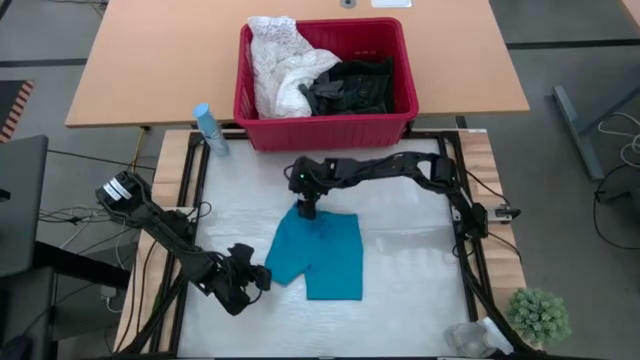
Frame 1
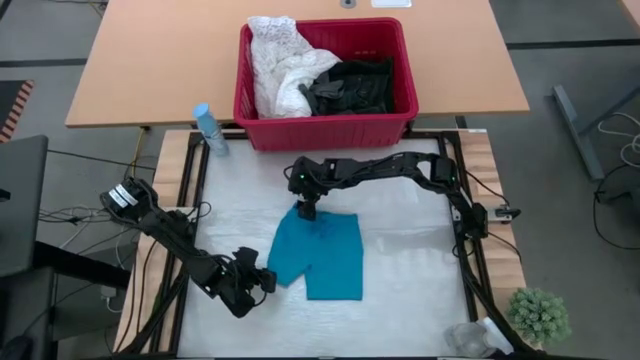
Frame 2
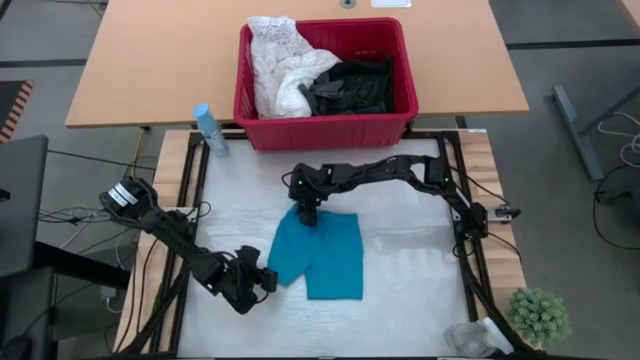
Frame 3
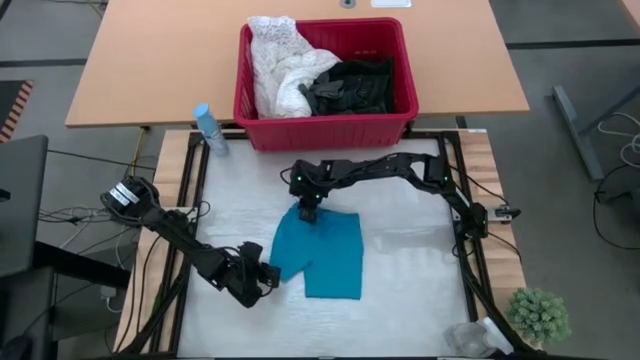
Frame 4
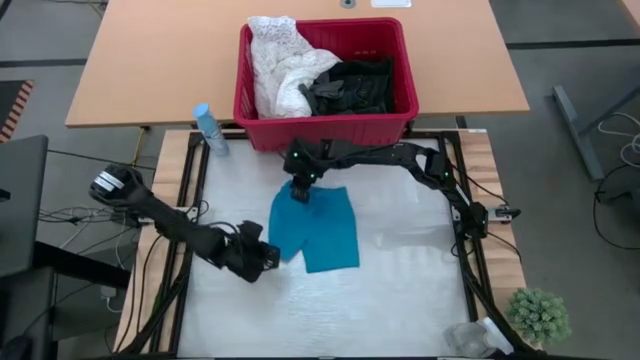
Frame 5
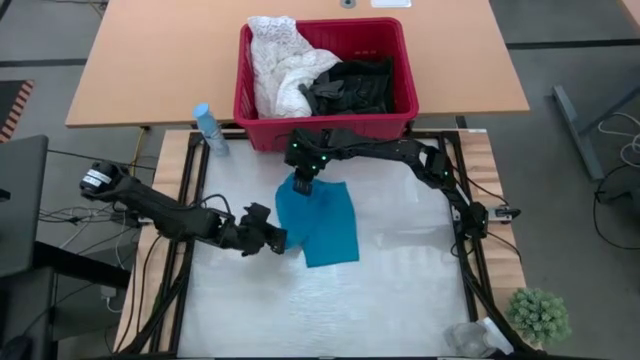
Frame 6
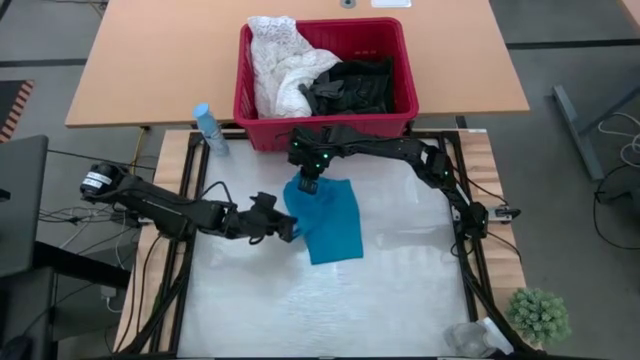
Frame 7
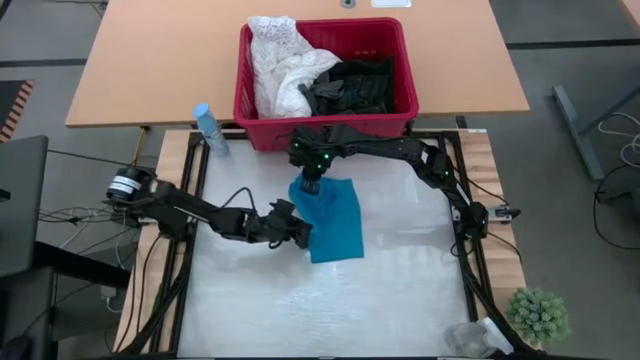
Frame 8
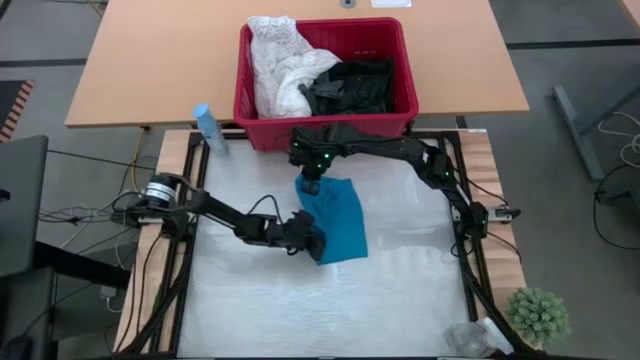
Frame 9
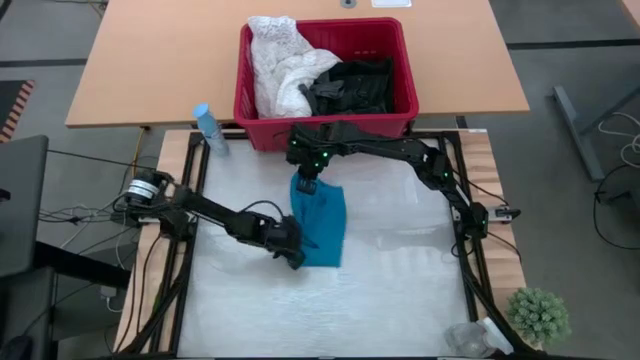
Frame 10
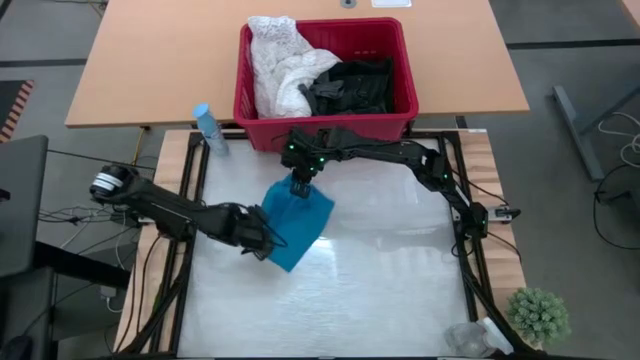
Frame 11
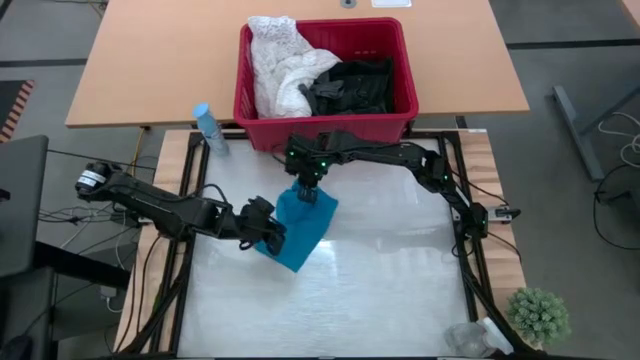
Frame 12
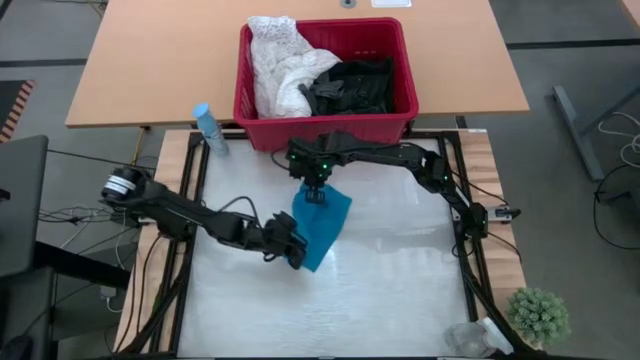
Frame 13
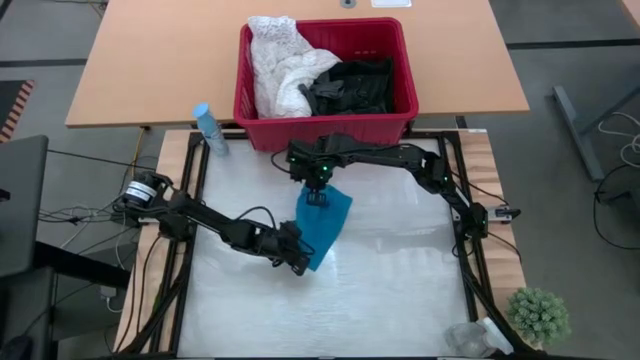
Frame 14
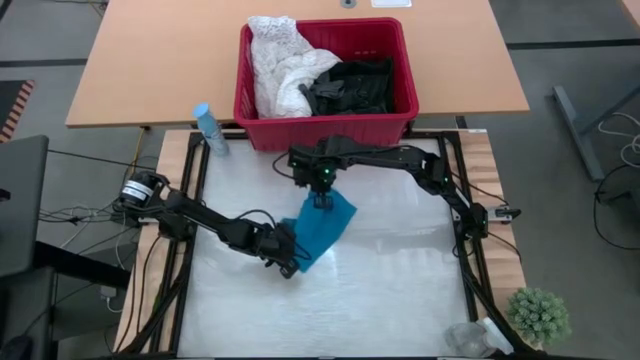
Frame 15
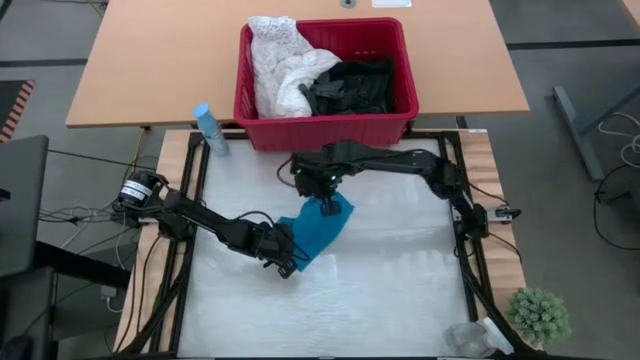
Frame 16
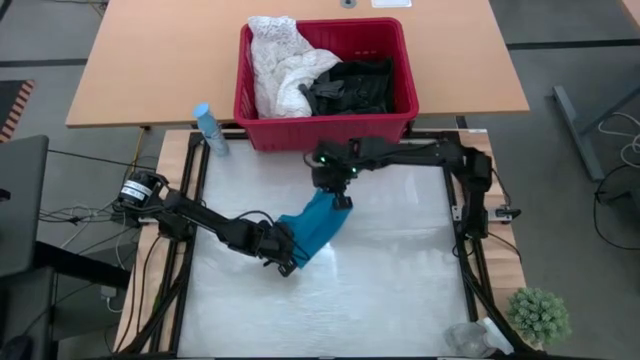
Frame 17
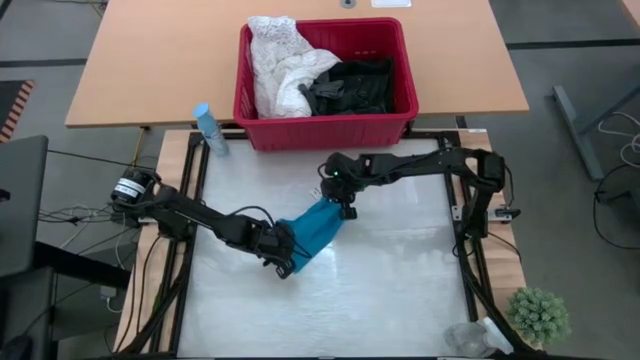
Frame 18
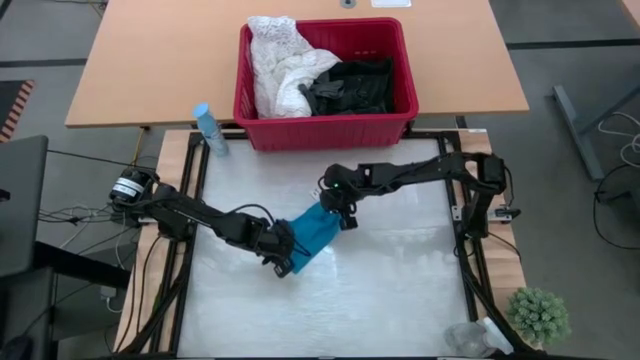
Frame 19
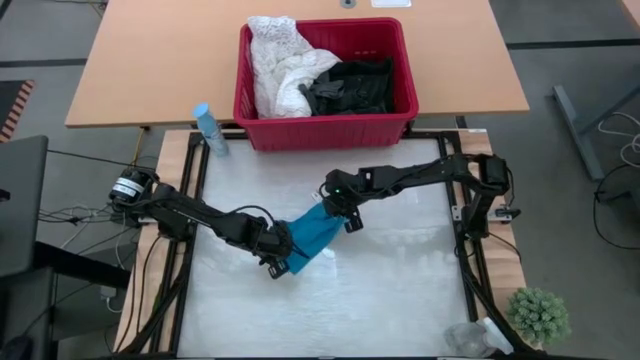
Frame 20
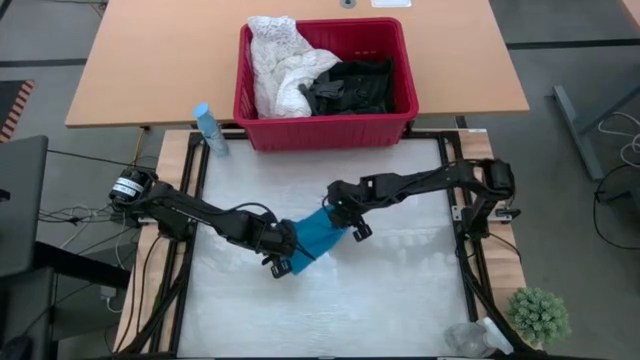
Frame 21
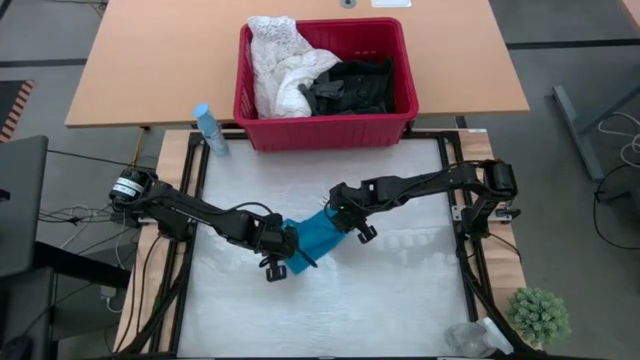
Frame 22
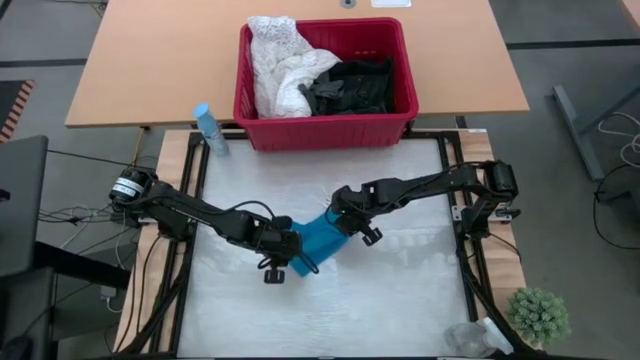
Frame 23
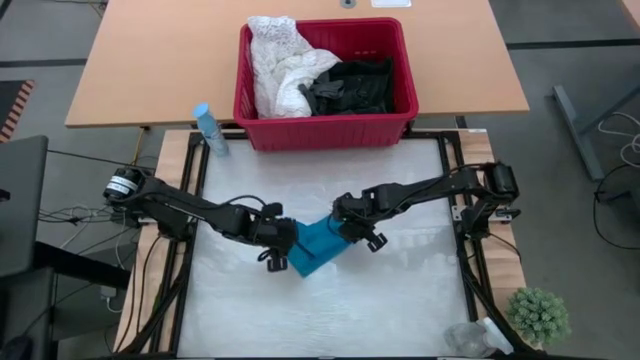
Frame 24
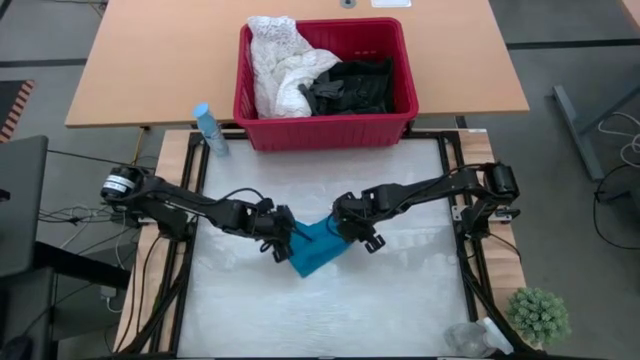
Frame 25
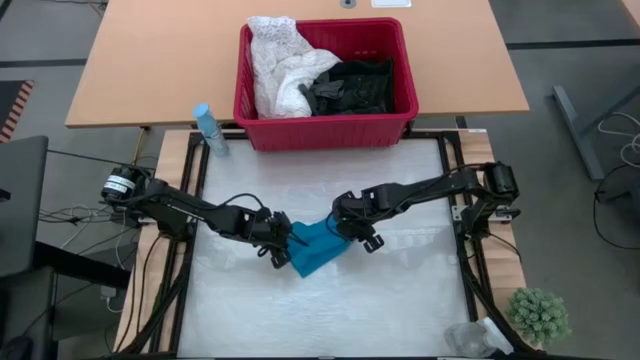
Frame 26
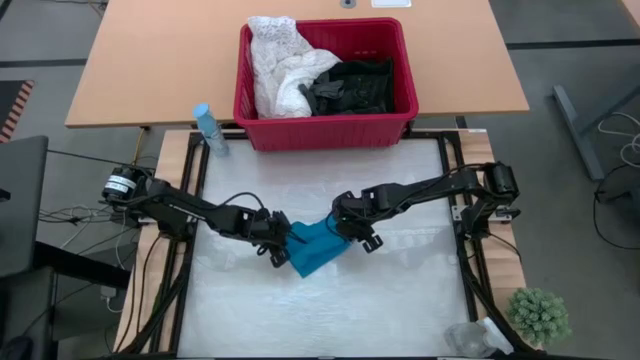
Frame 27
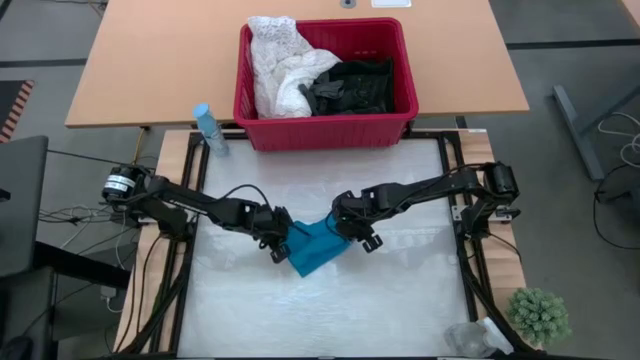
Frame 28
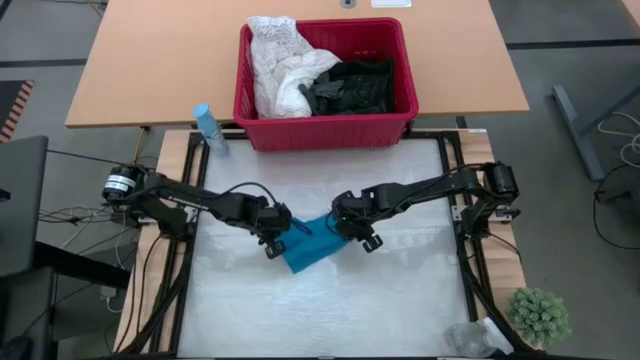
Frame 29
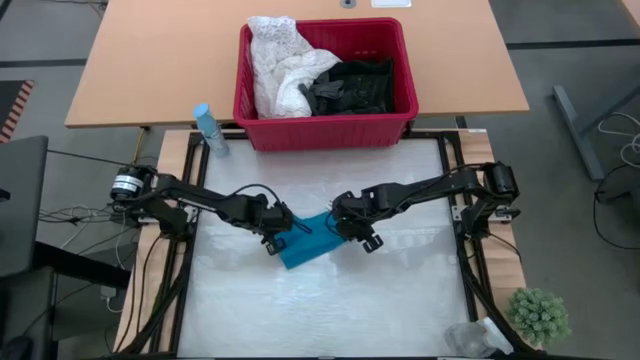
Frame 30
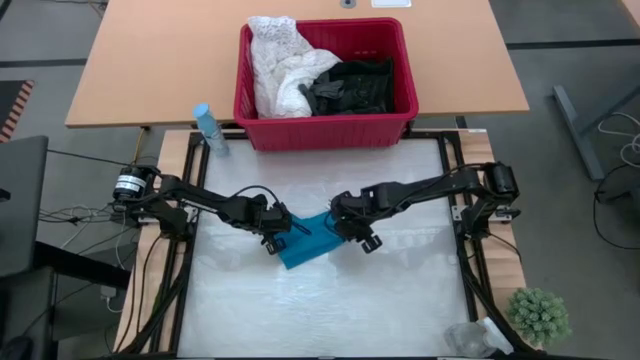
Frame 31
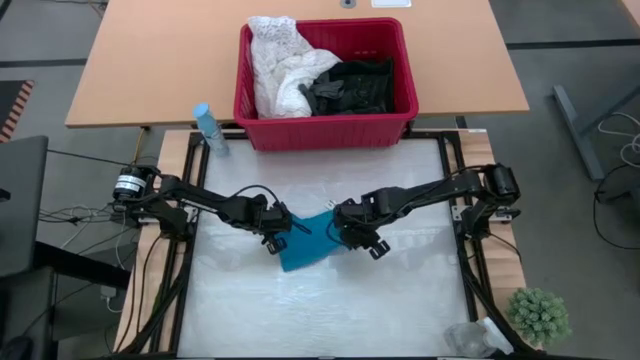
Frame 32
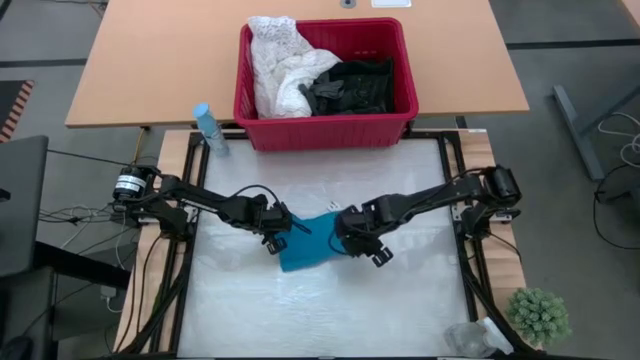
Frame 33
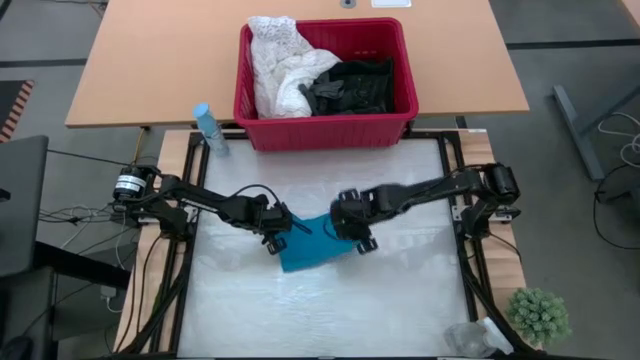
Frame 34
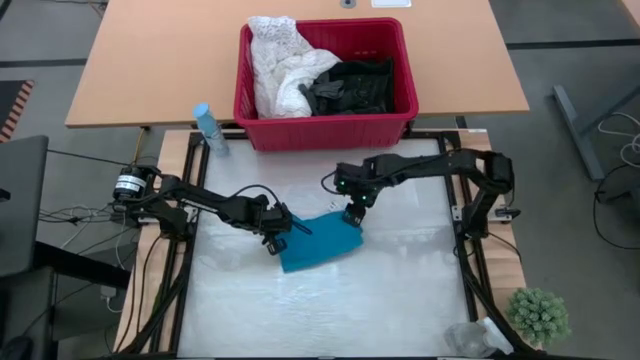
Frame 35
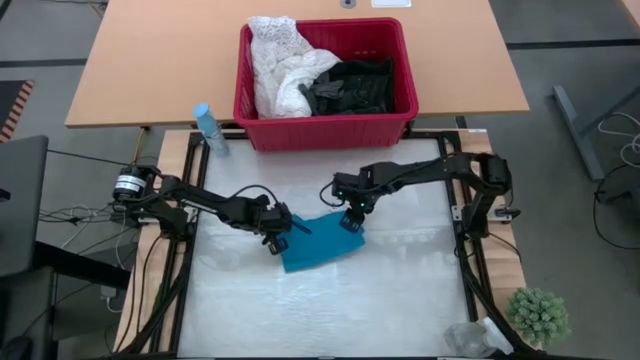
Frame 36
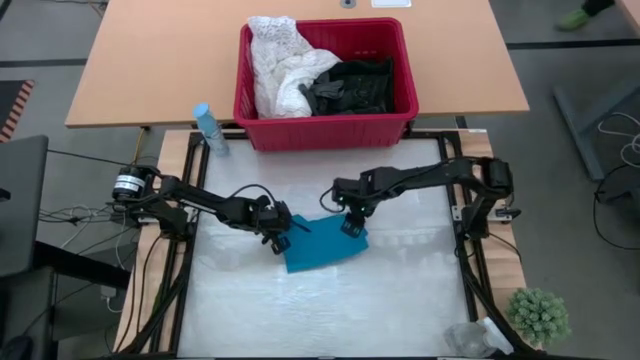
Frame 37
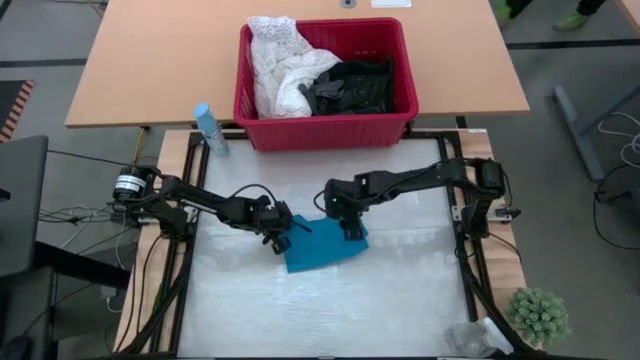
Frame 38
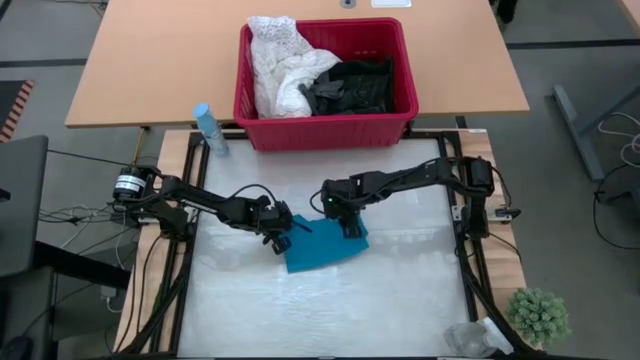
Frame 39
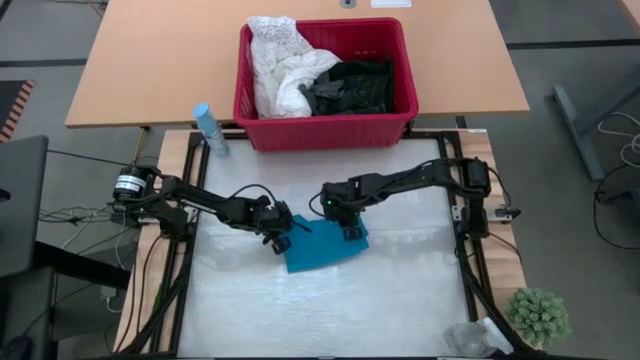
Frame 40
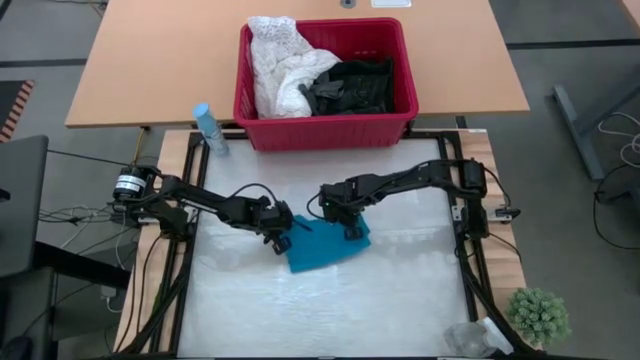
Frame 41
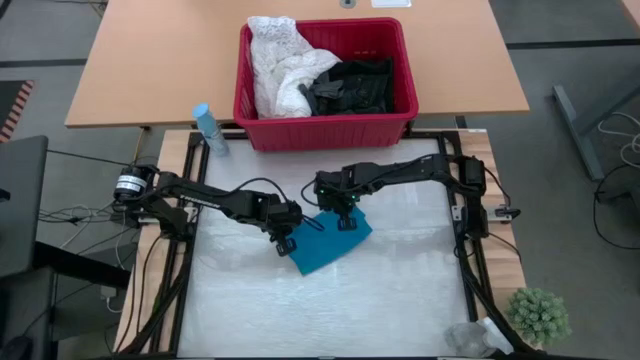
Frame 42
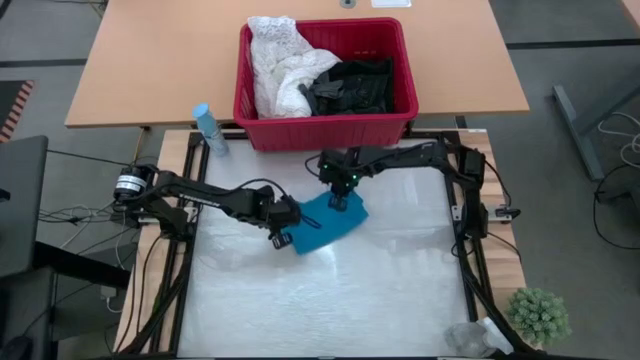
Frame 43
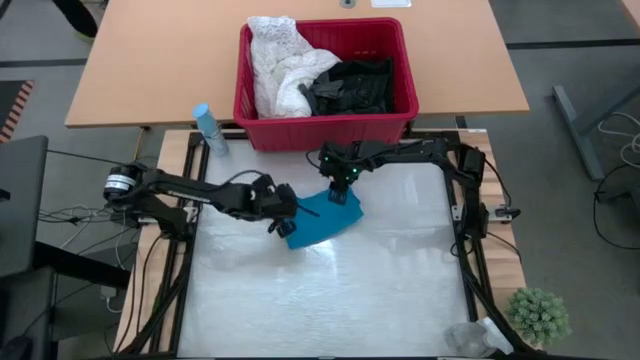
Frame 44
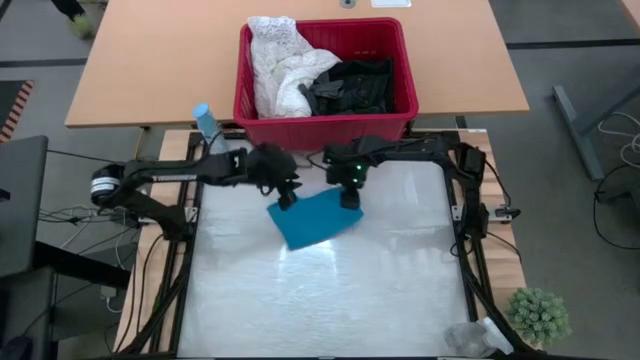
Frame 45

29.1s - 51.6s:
Task: Fold laundry
Fold the blue shorts
